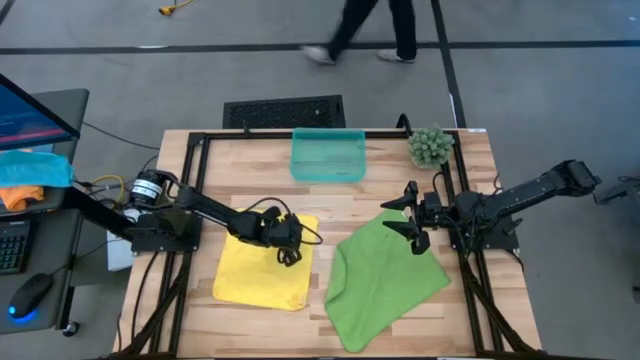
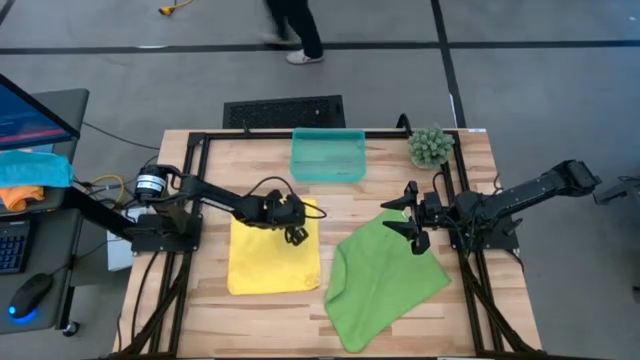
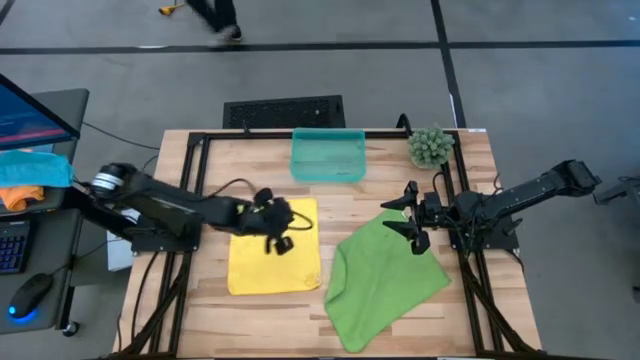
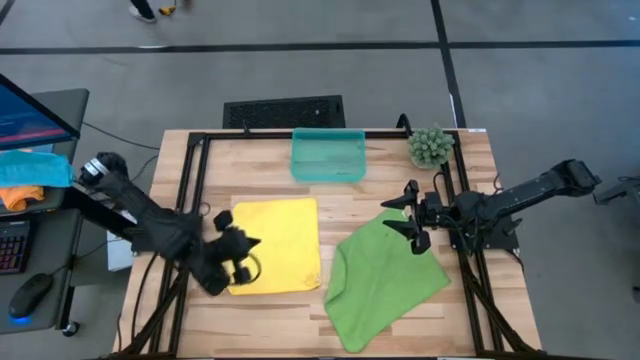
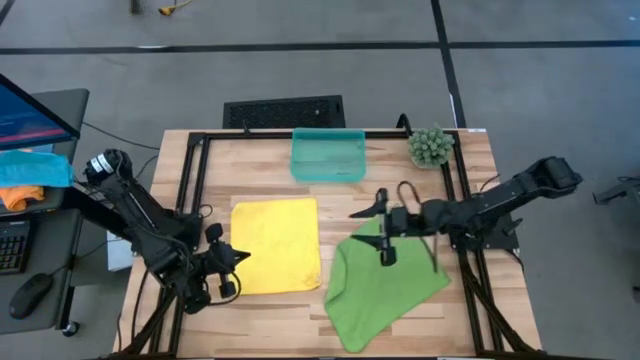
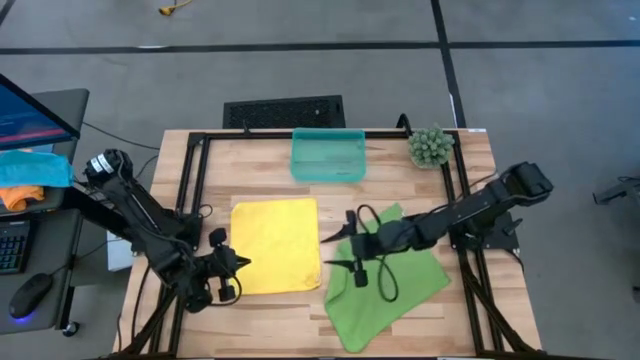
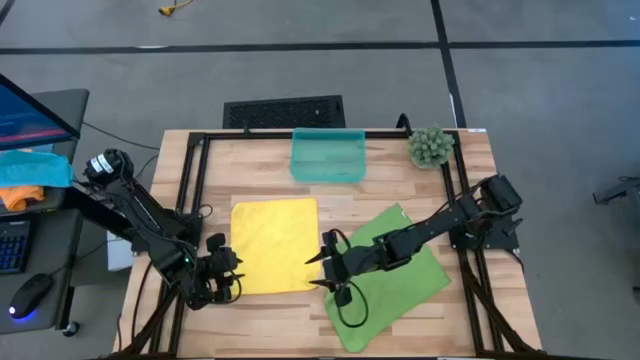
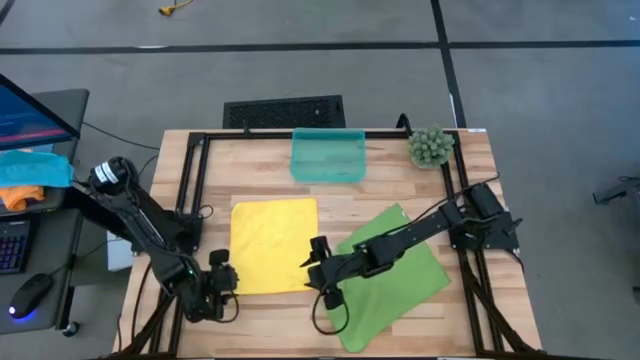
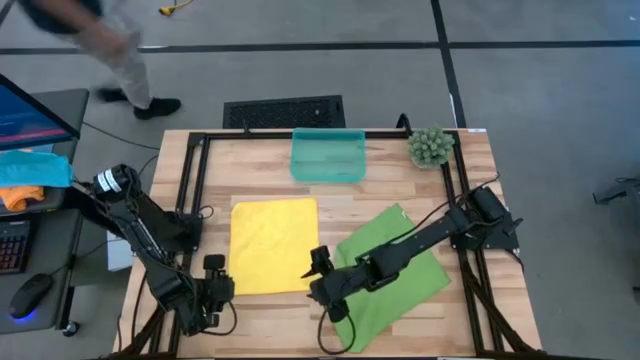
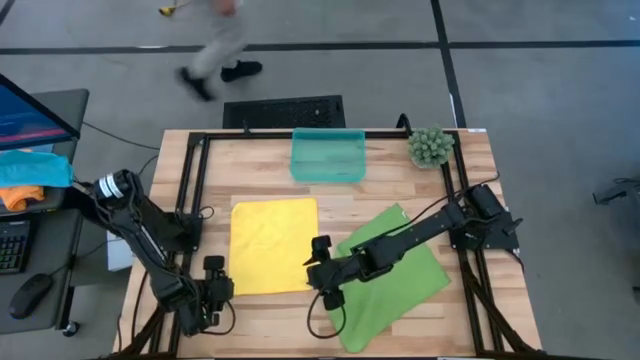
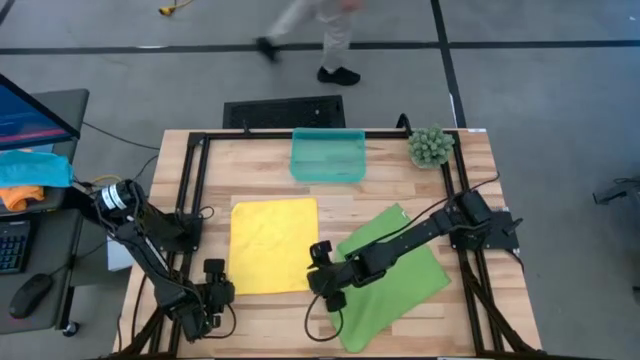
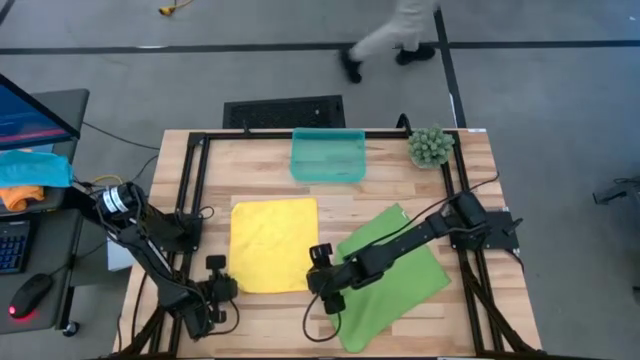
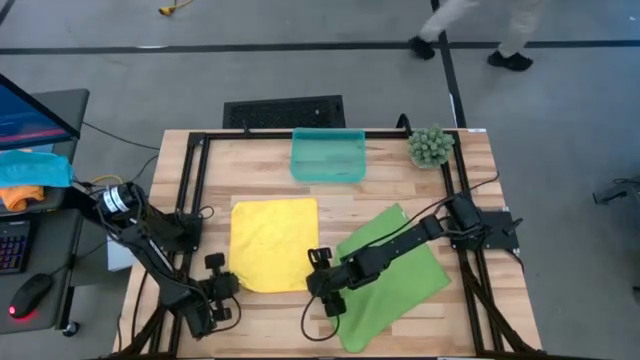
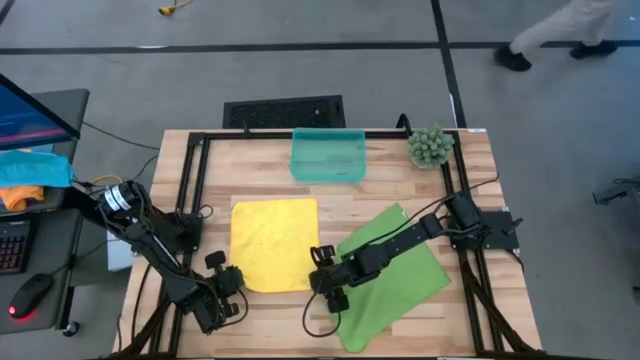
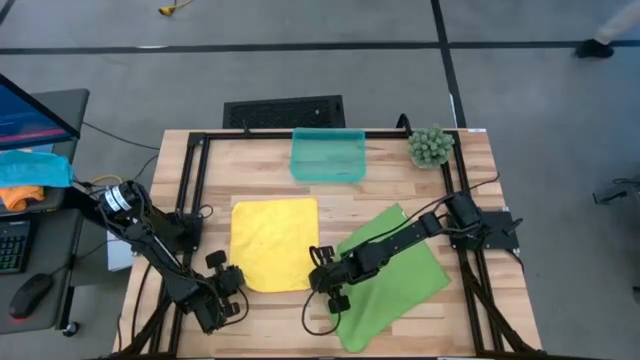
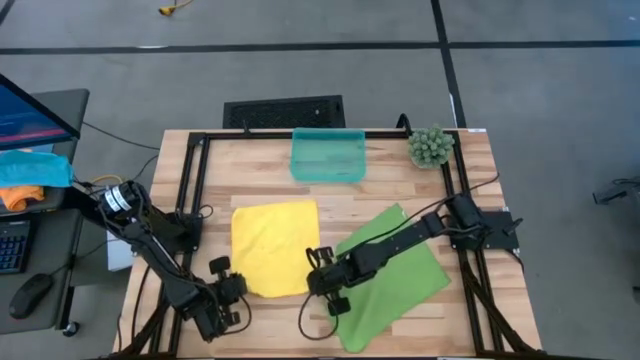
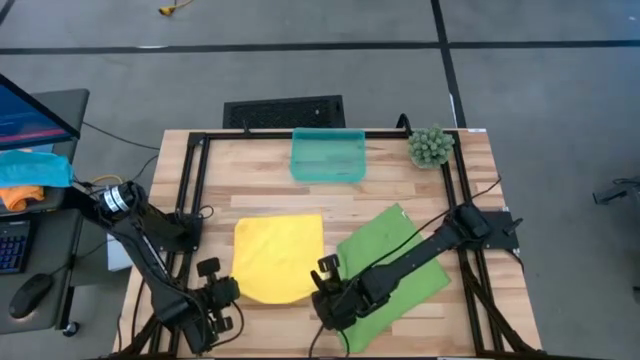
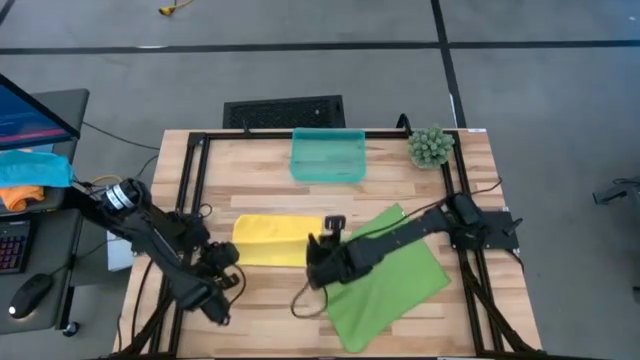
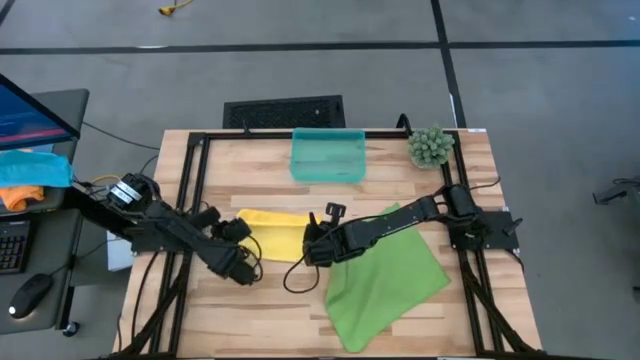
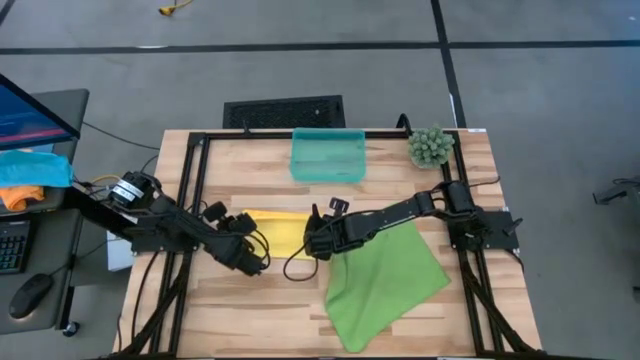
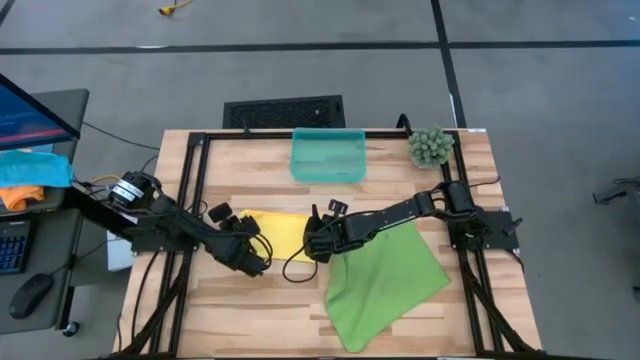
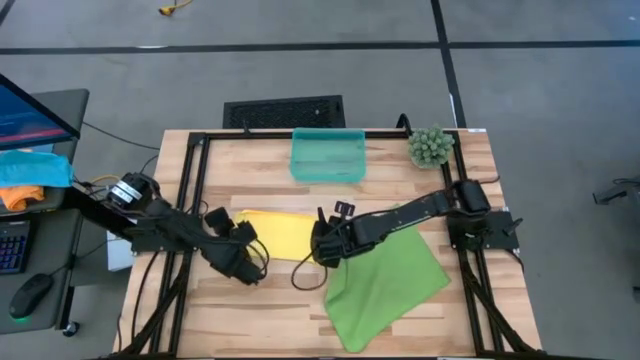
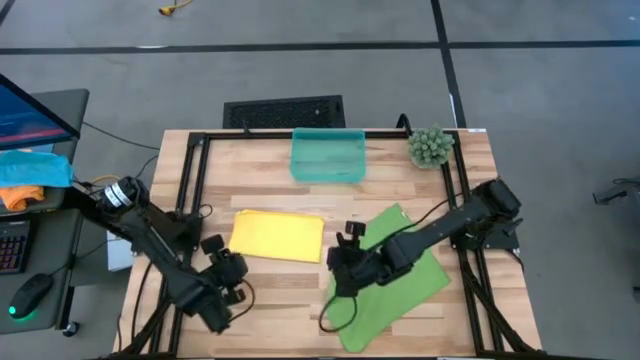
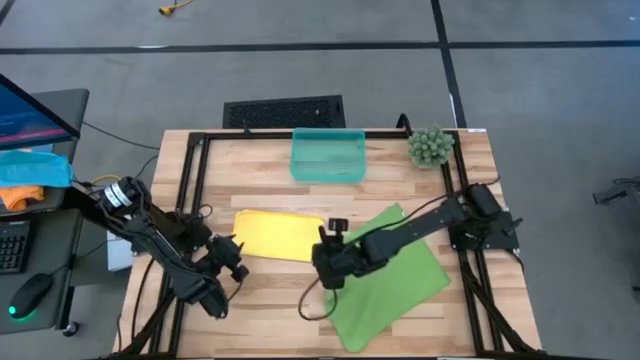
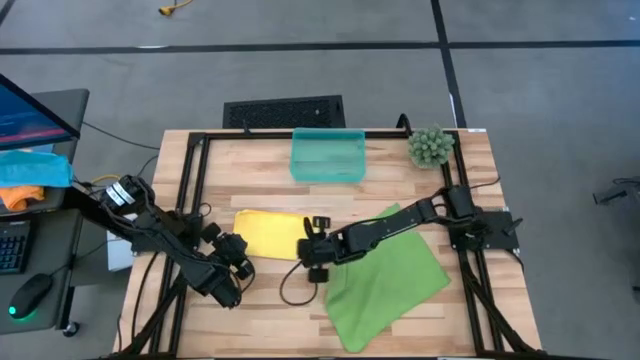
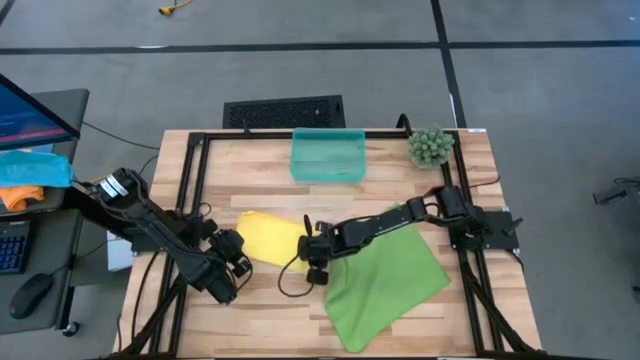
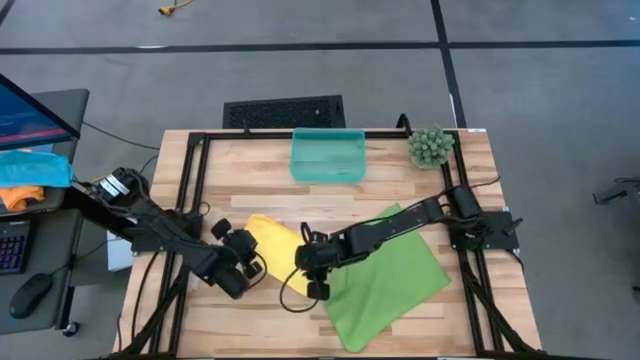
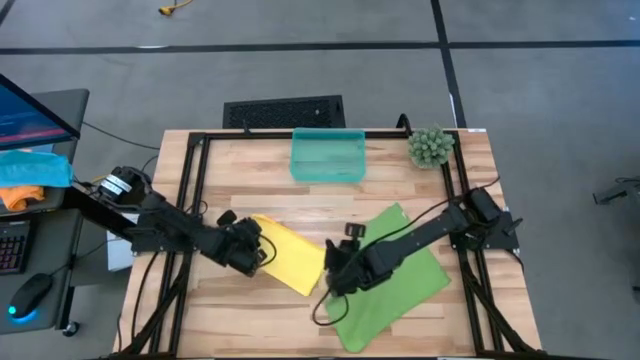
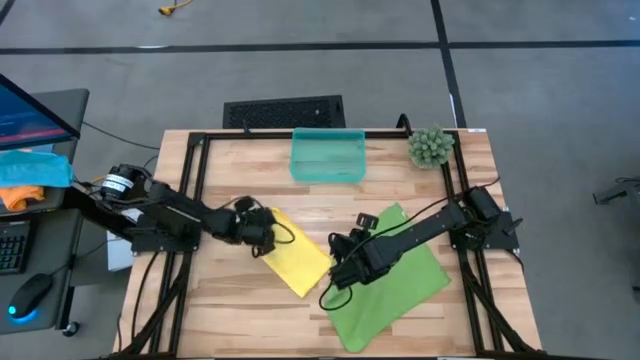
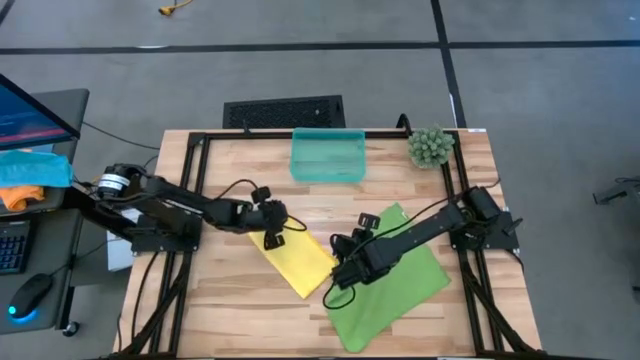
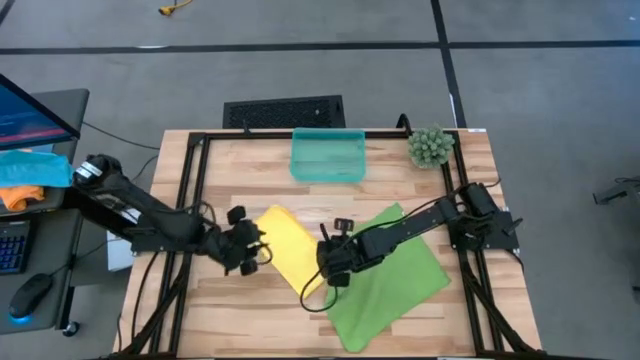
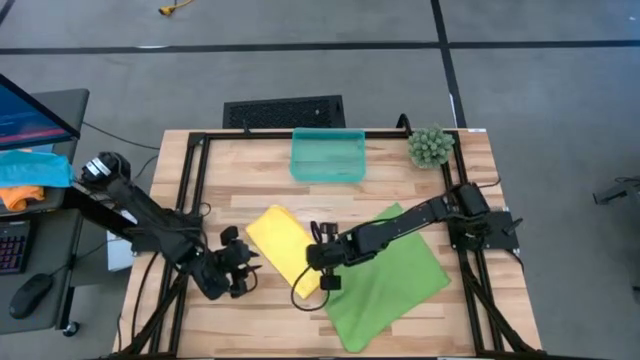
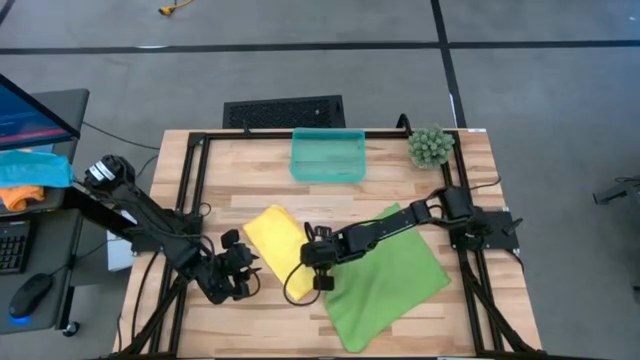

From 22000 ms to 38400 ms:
Task: Roll microfiber towels into tight, uniform cylinder then place into a basket
Fold the yellow microfiber towel

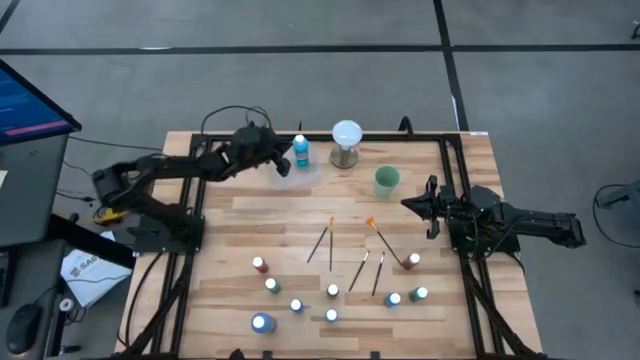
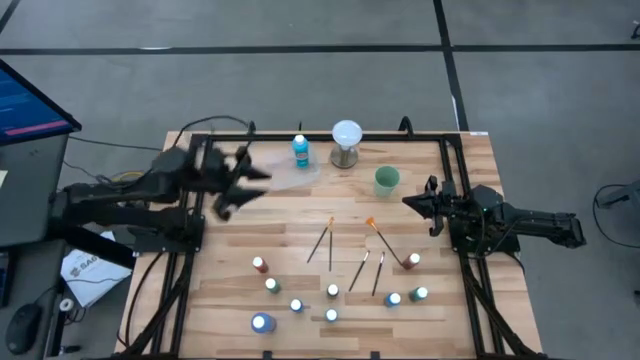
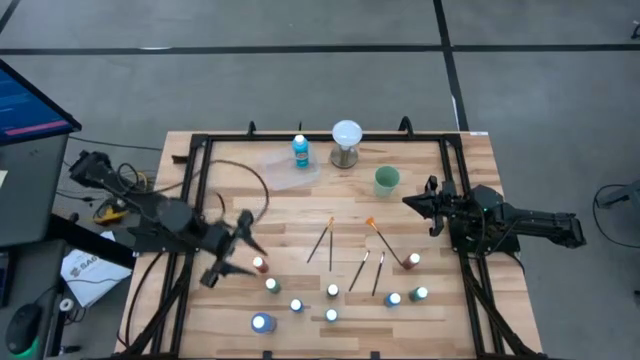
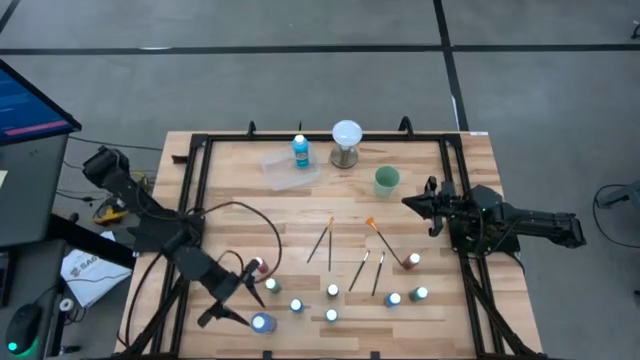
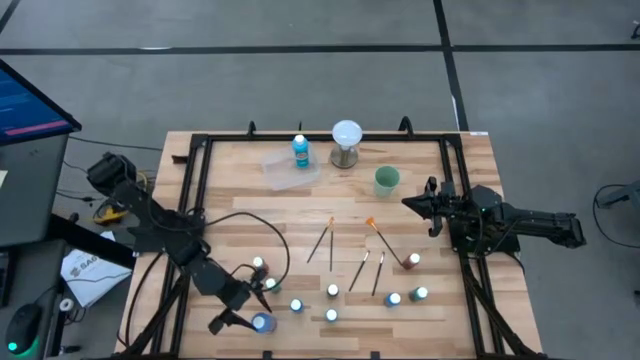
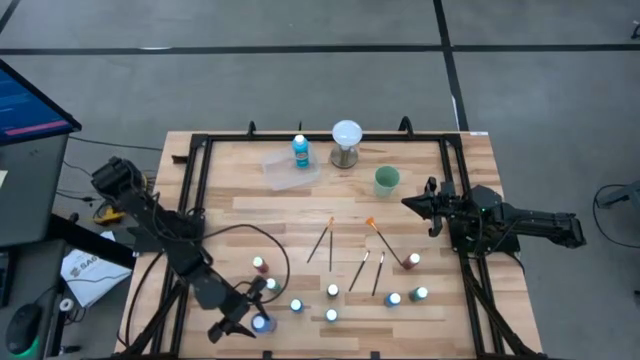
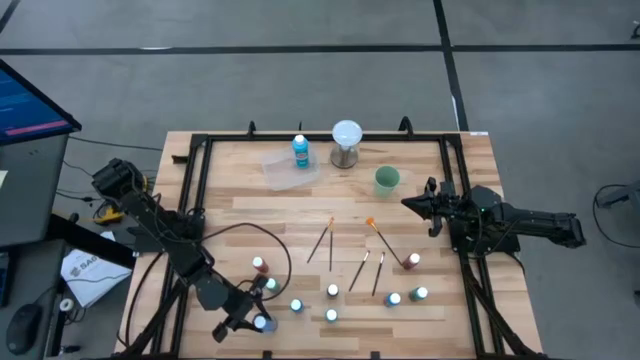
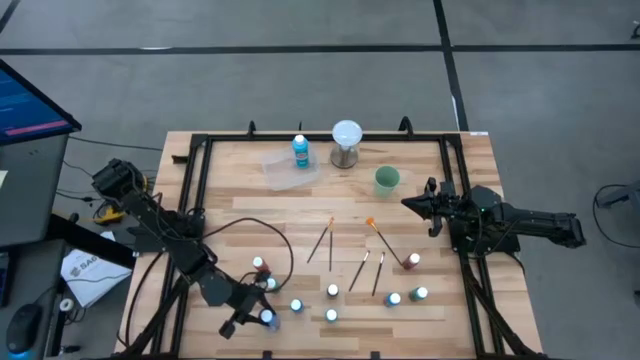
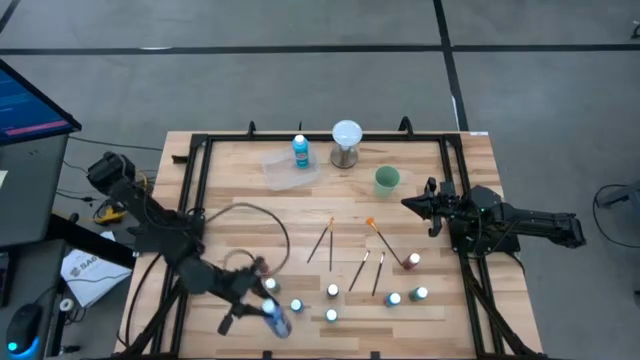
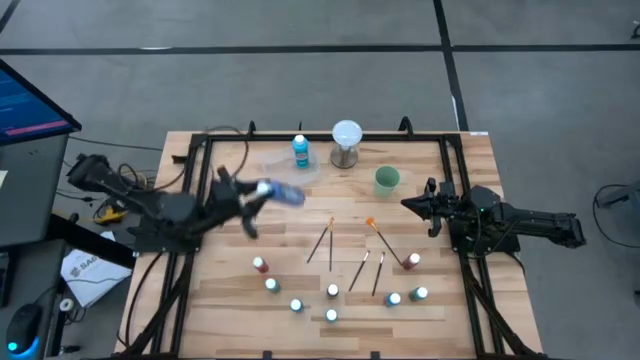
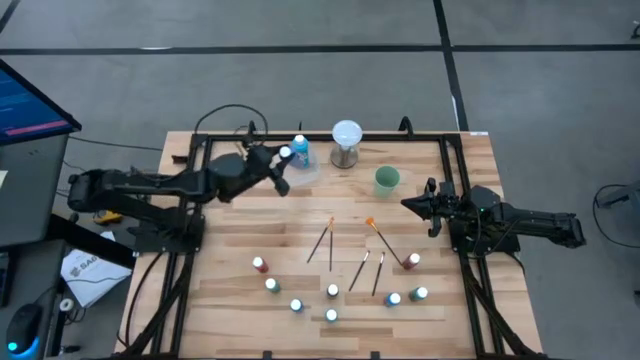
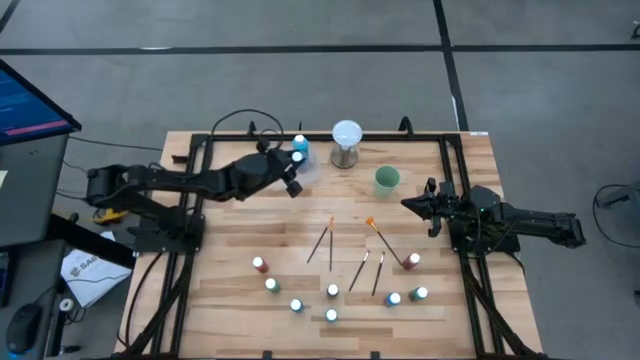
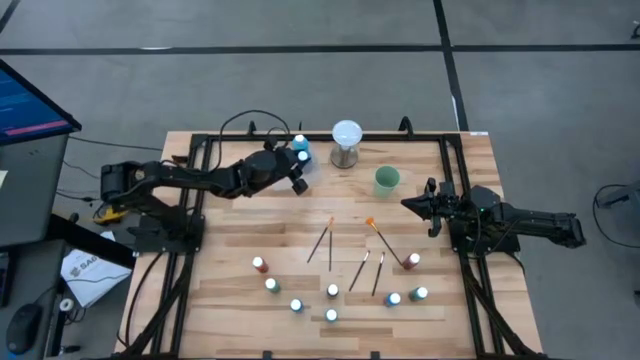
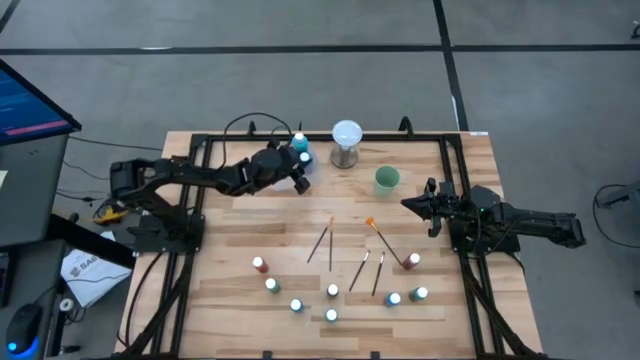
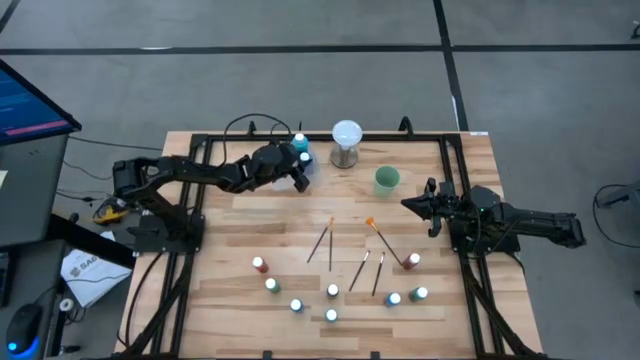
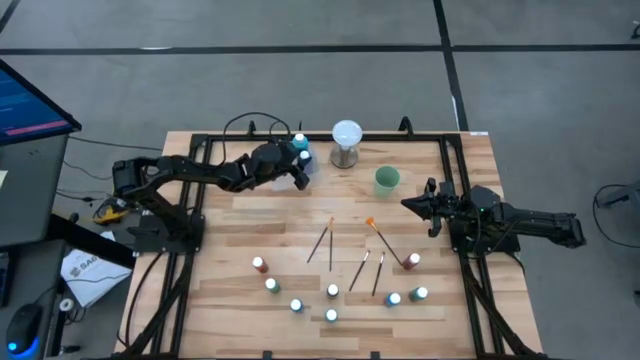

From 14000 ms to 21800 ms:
Task: Pick & Place Paint Supplies
Put the big purple paint bottle into the transparent bin
